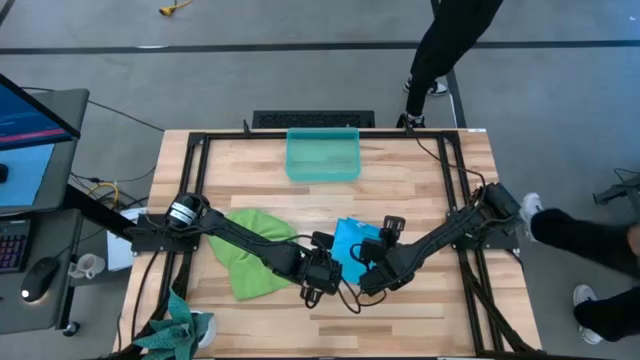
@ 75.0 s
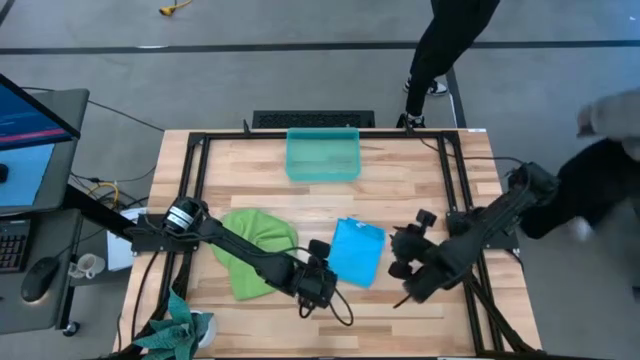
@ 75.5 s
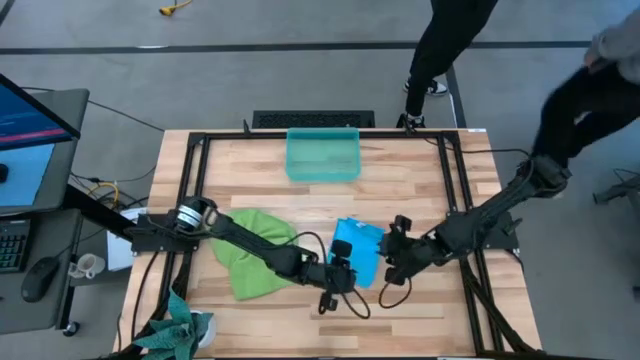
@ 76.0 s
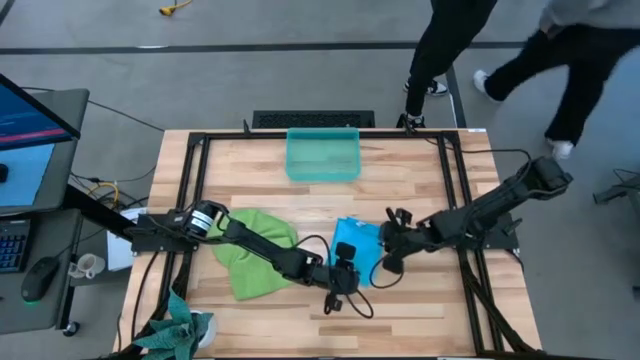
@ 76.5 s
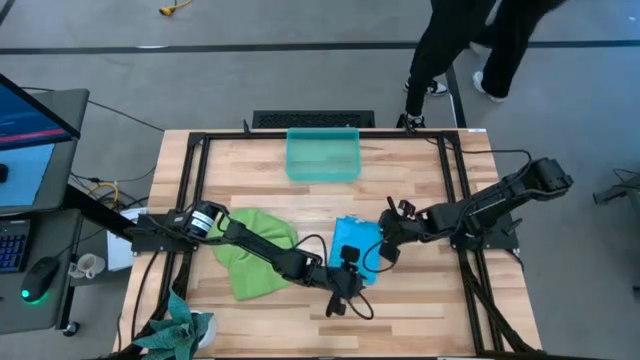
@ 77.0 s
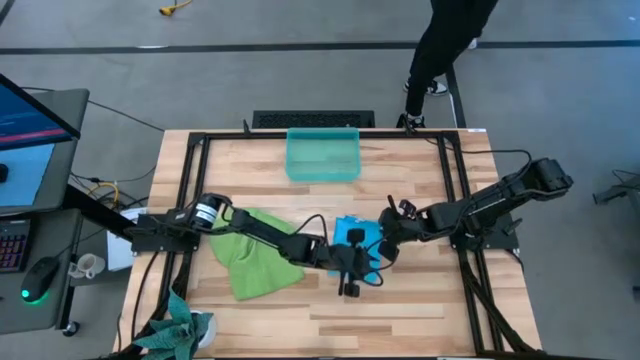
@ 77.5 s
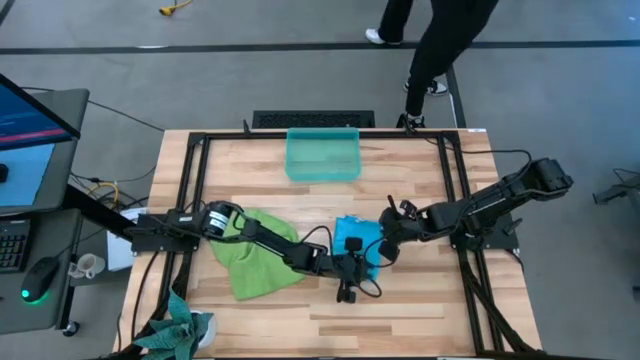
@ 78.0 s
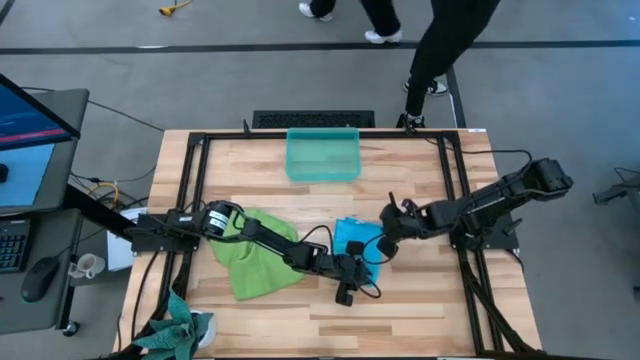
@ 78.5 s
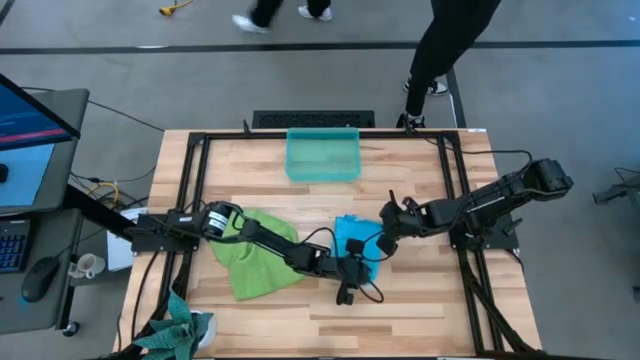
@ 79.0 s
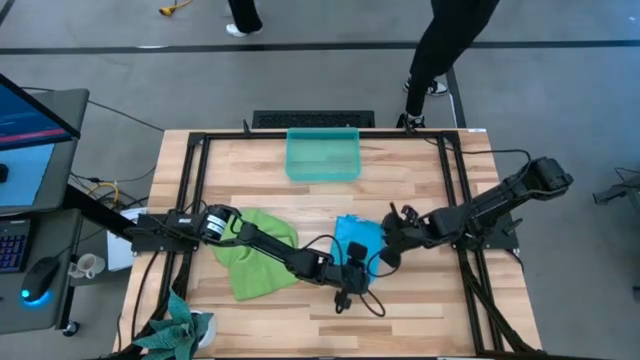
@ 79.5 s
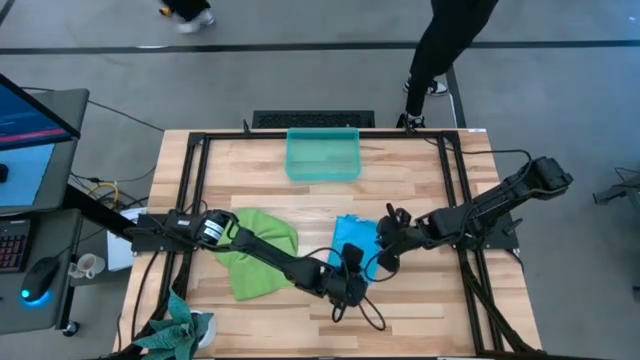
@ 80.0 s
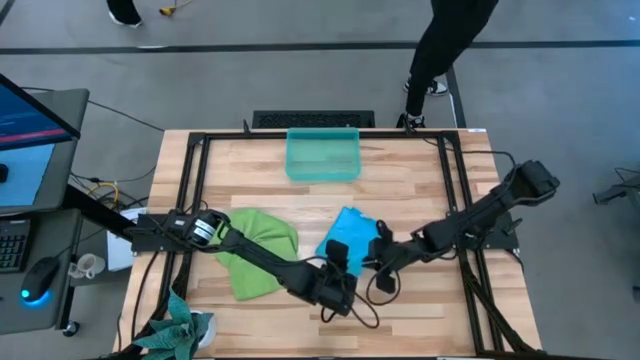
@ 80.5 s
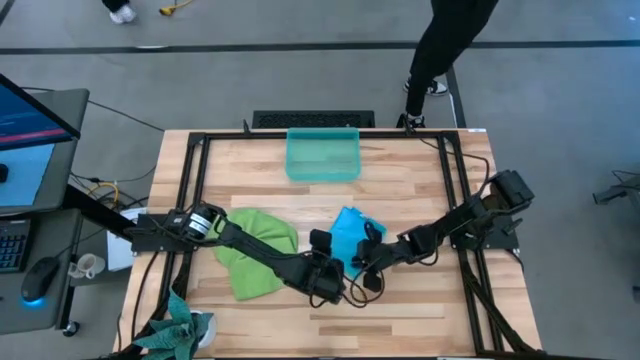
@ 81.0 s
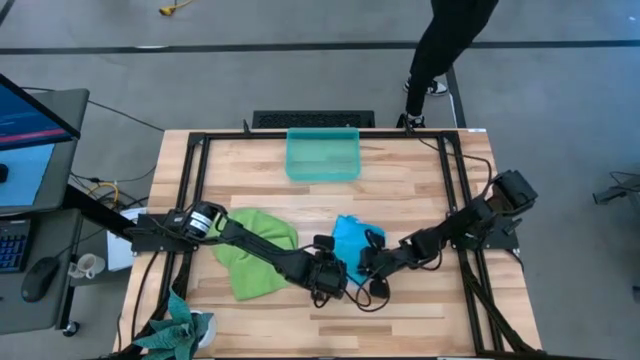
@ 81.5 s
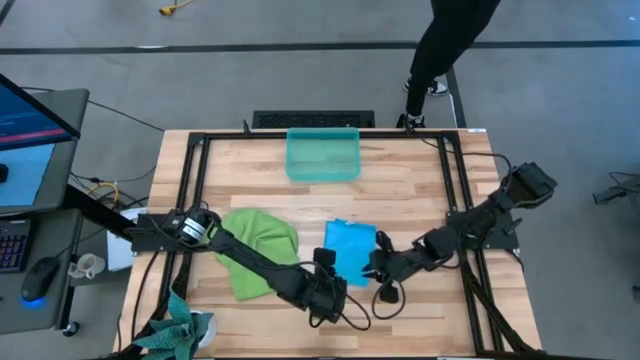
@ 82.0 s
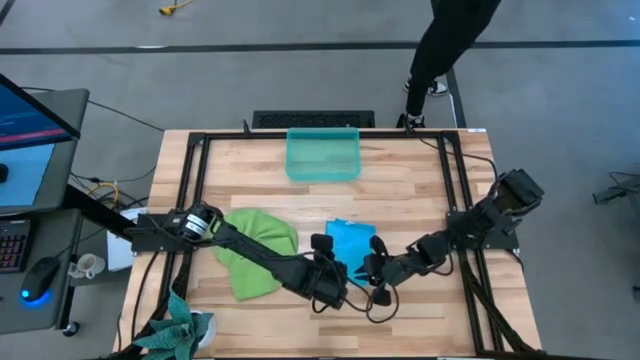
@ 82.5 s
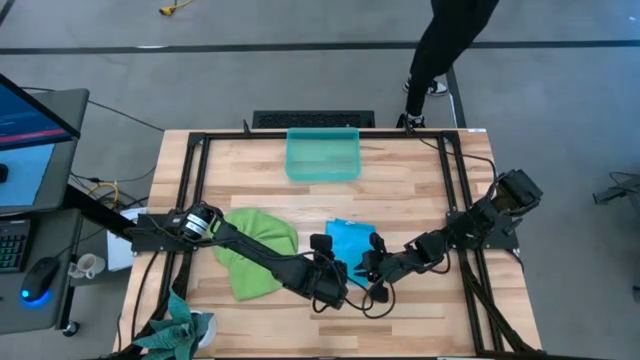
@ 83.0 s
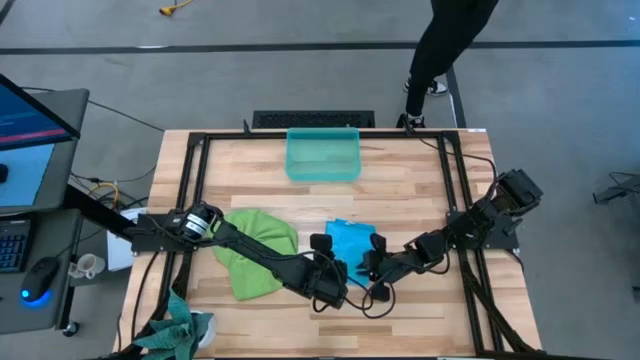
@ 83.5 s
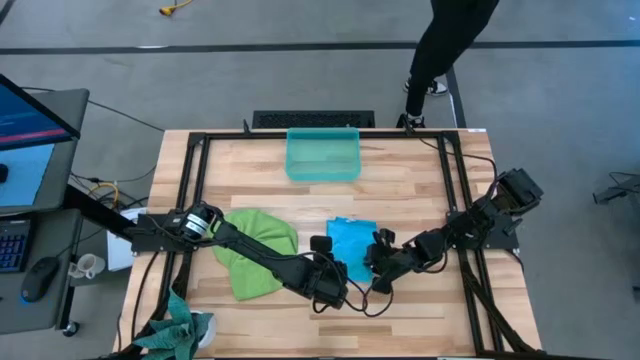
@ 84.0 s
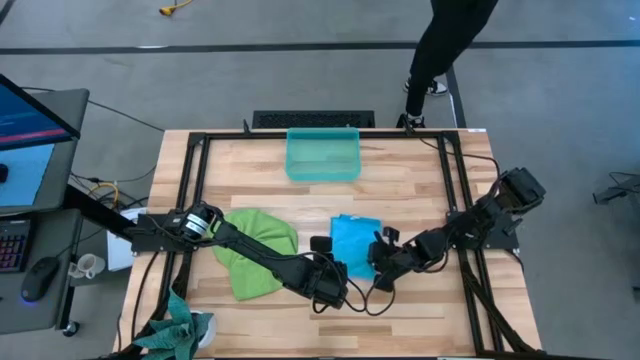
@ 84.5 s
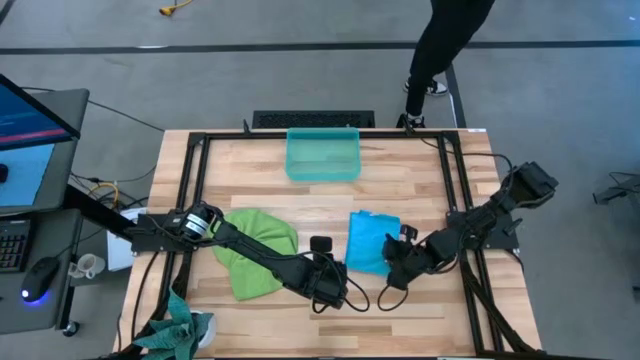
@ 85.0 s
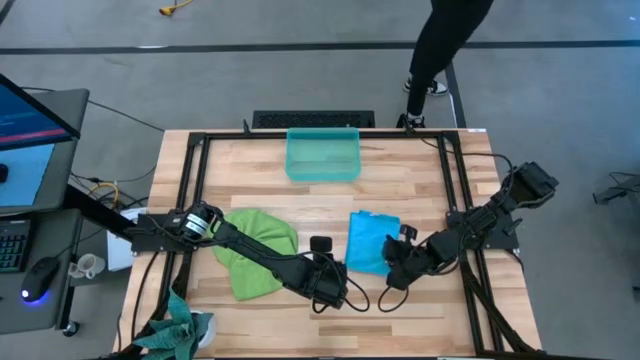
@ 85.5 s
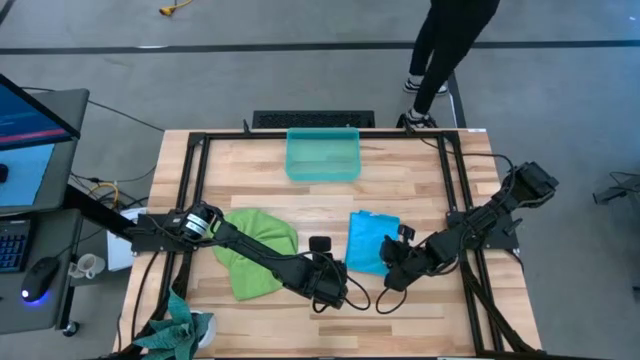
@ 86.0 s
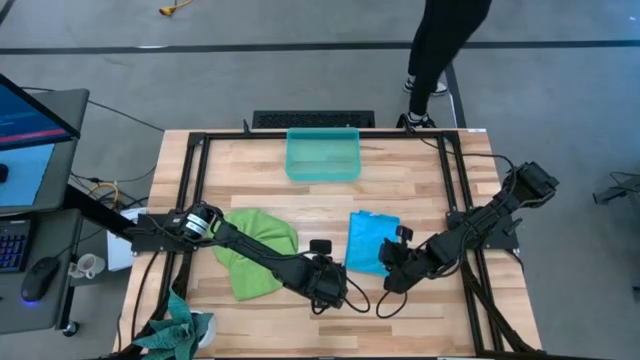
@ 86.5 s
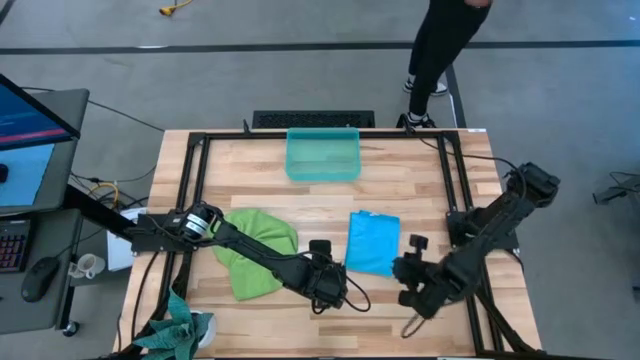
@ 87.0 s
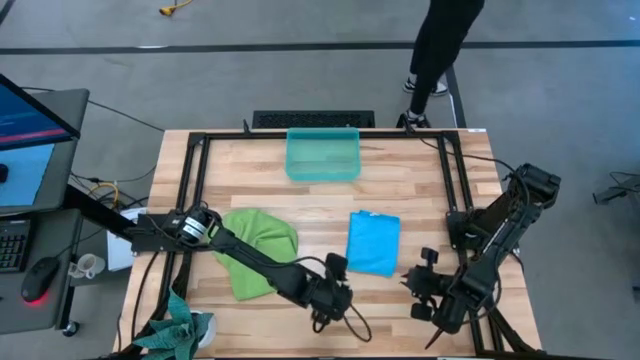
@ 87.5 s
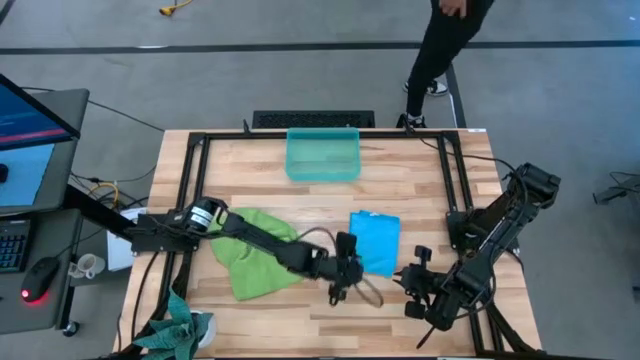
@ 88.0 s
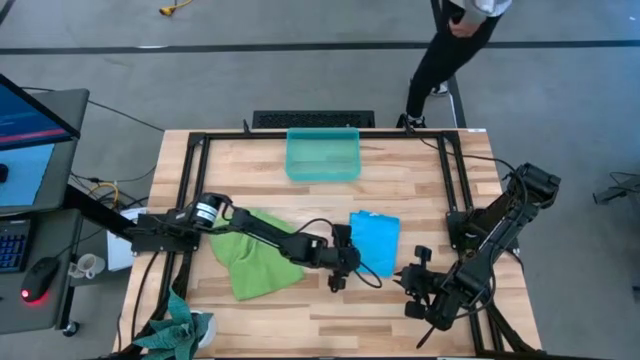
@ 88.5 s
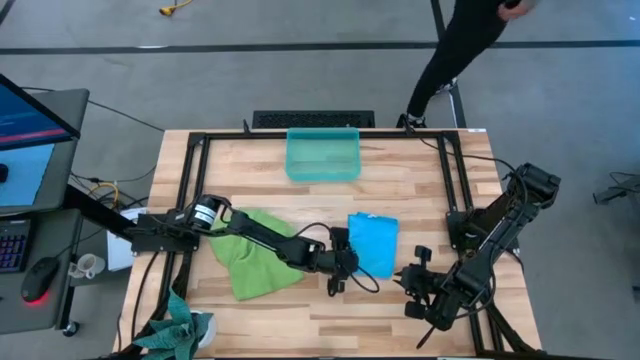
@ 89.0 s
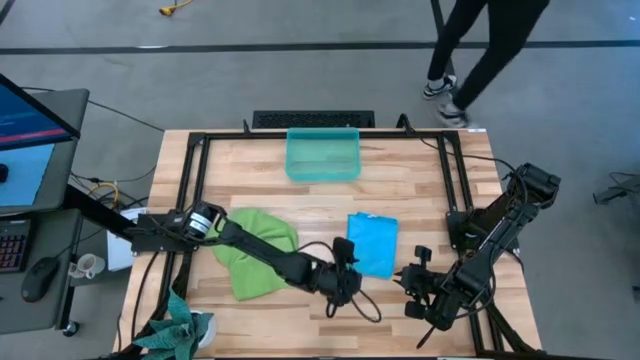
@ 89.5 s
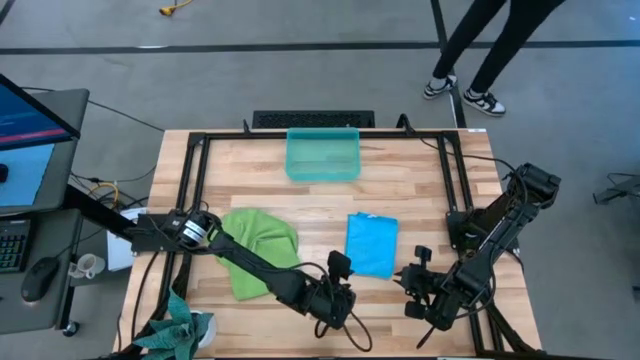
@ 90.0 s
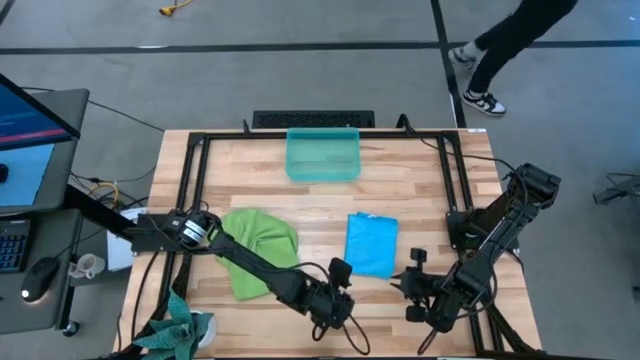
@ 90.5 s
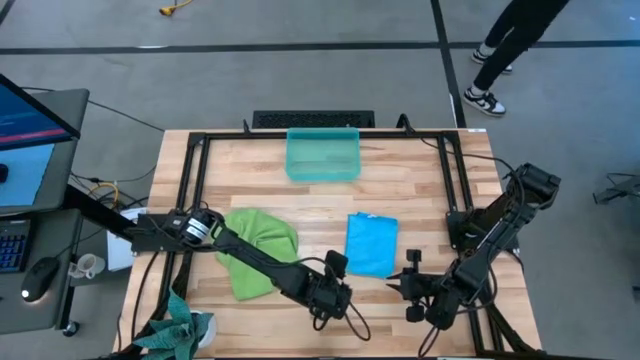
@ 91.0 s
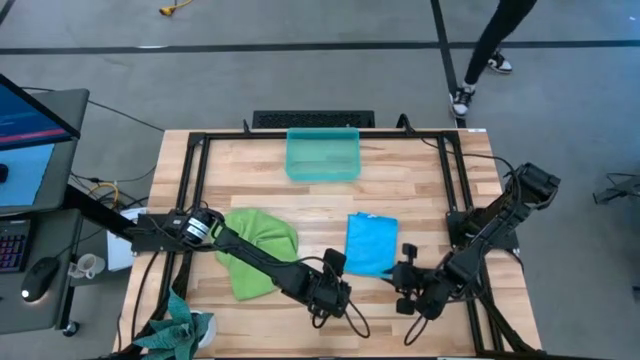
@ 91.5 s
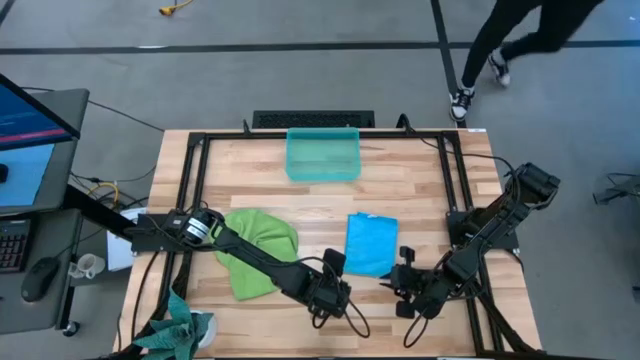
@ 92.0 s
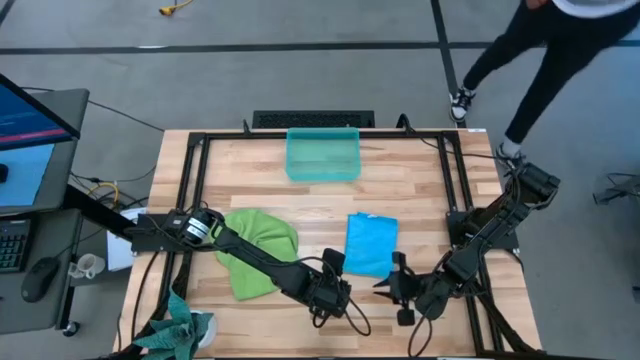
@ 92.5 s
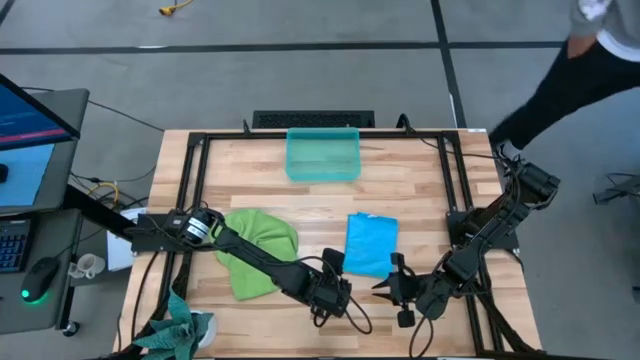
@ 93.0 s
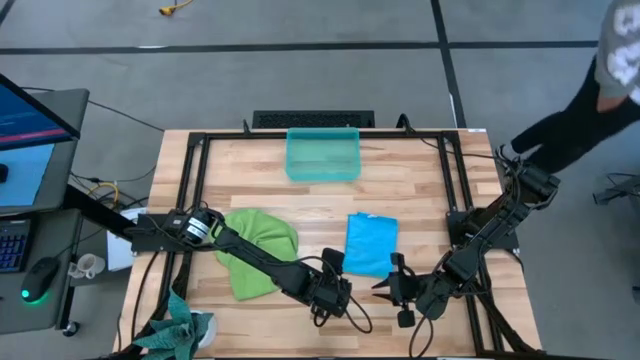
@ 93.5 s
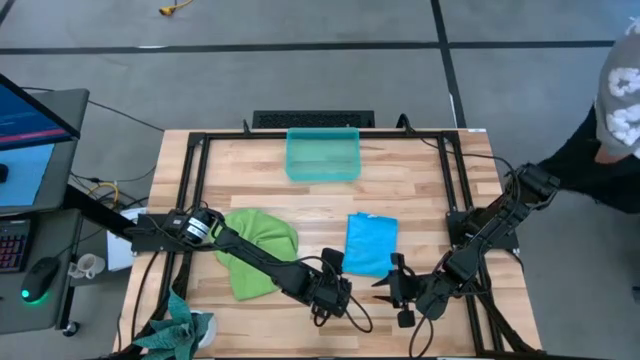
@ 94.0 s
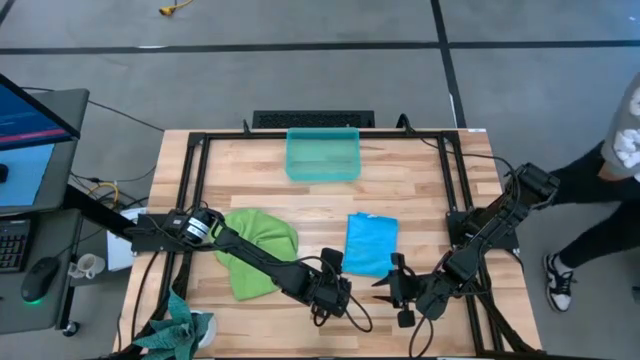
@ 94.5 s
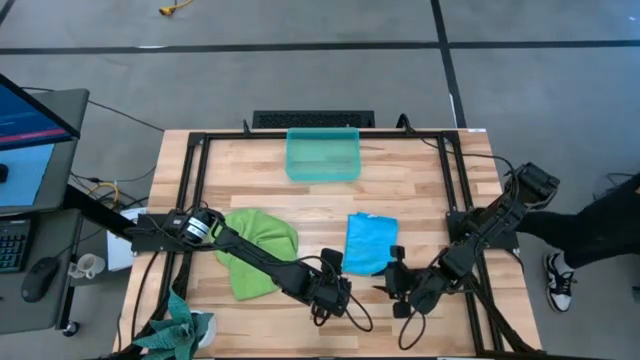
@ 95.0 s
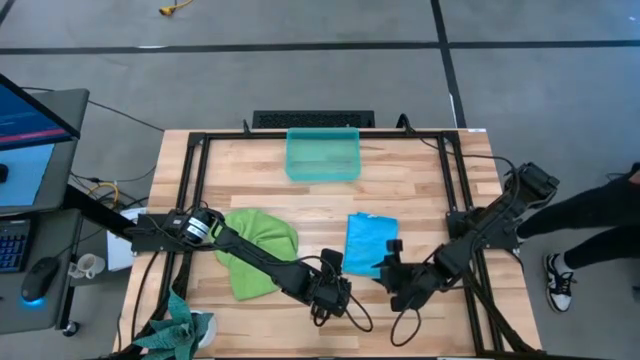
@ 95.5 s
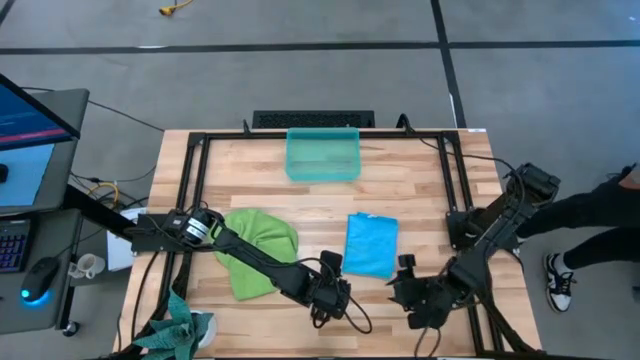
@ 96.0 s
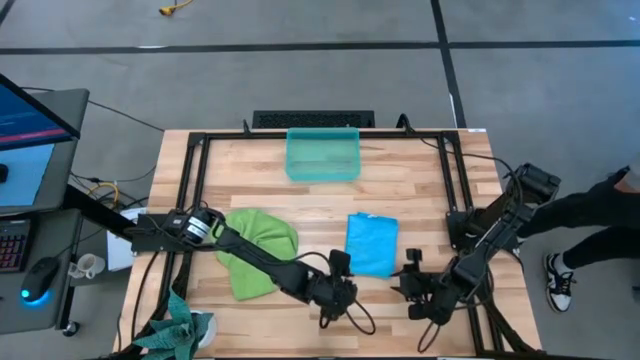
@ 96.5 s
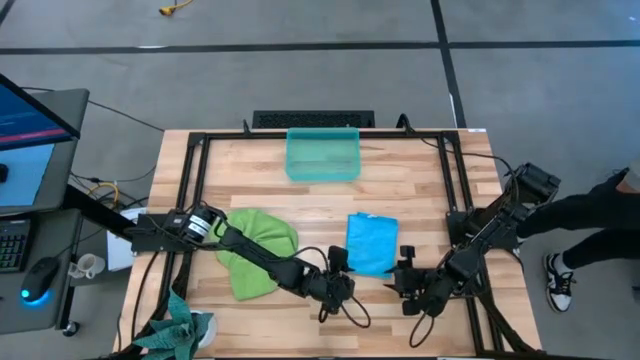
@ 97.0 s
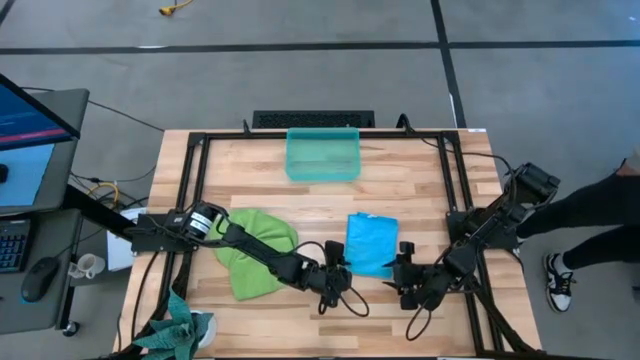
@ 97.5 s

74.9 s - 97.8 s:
Task: Roll microfiber towels into tight, uniform cylinder then place into a basket
Roll the blue microfiber cloth
